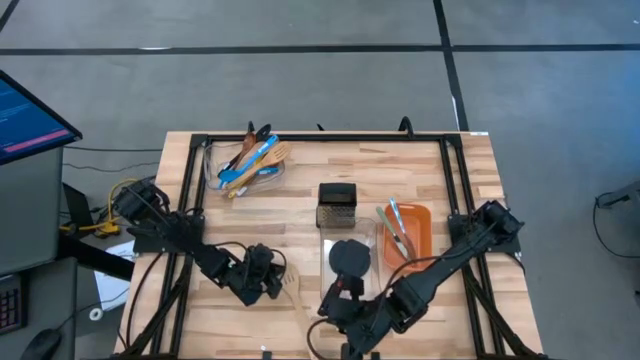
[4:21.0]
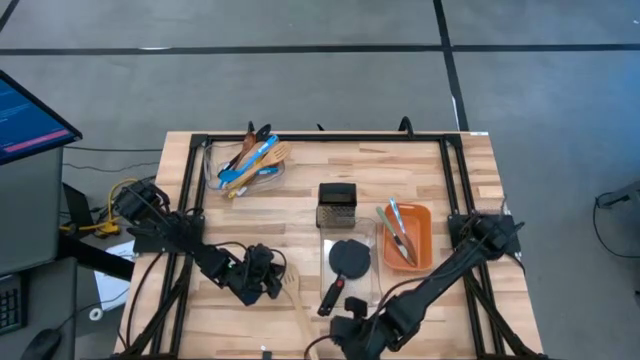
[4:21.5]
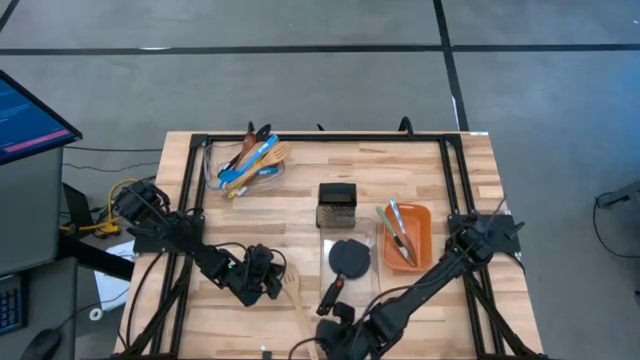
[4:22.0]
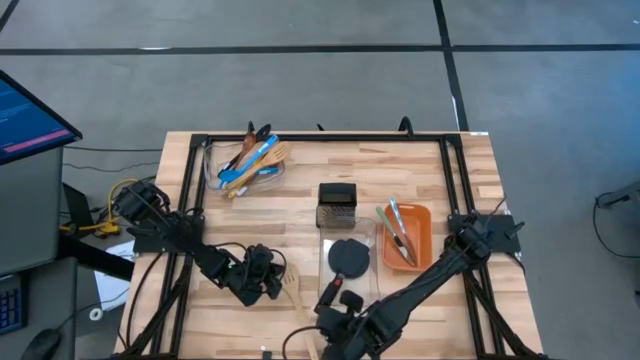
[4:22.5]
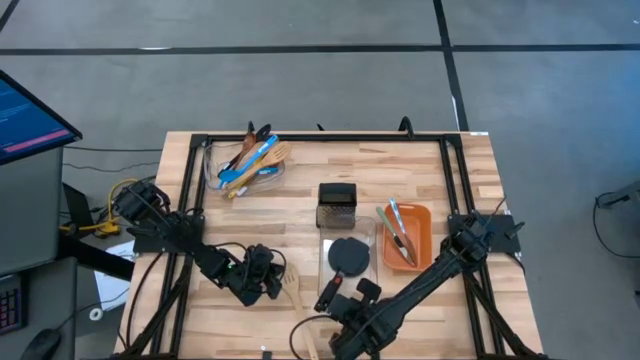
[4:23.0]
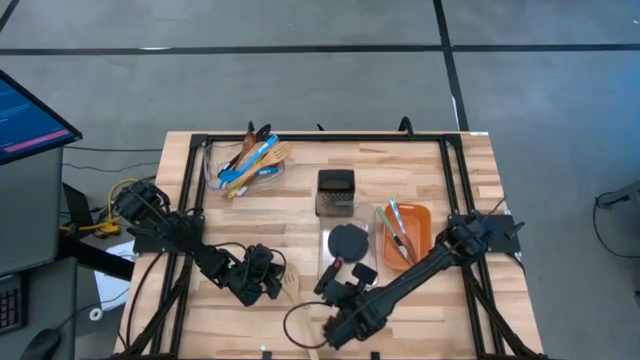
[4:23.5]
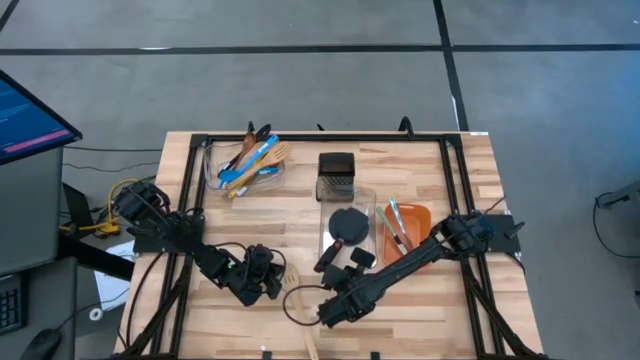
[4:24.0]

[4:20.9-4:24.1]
Task: Pick & Place Kitchen Items
Adjust the bottom transparent bin on the table

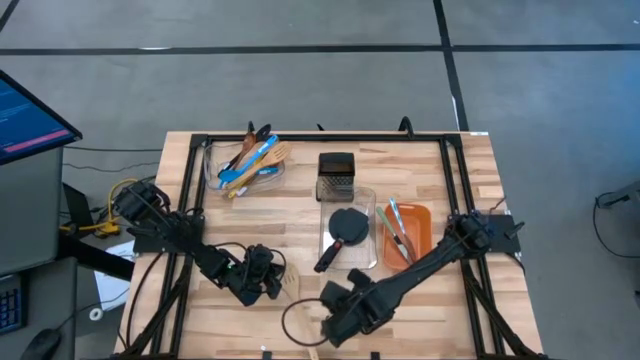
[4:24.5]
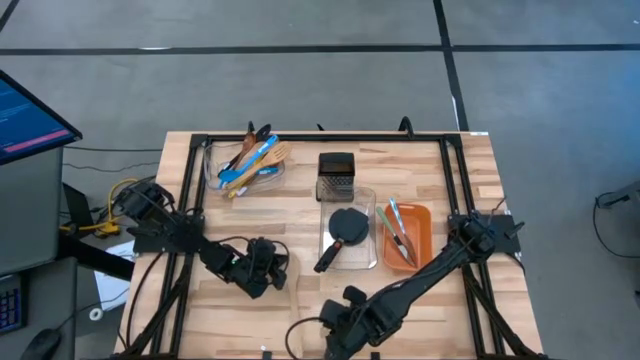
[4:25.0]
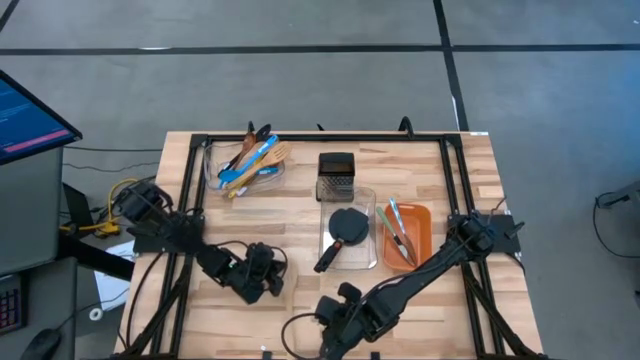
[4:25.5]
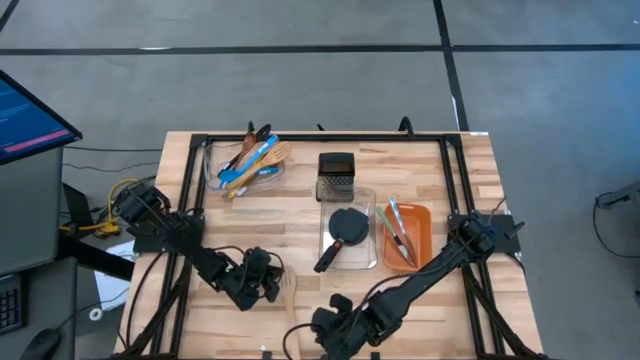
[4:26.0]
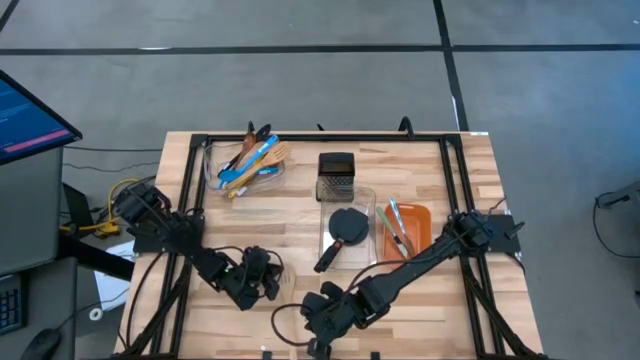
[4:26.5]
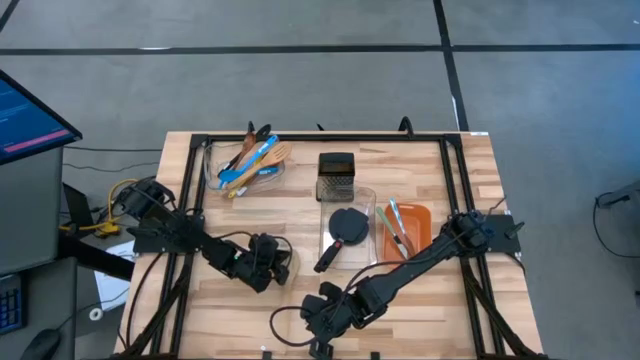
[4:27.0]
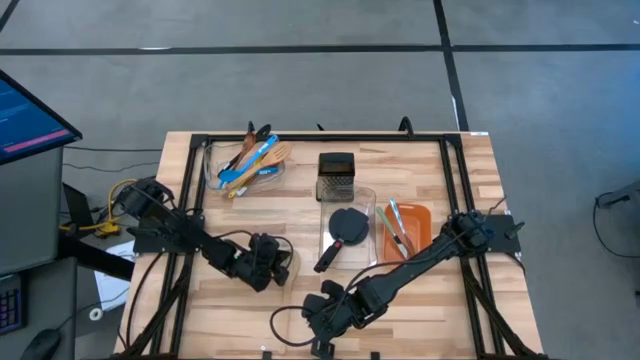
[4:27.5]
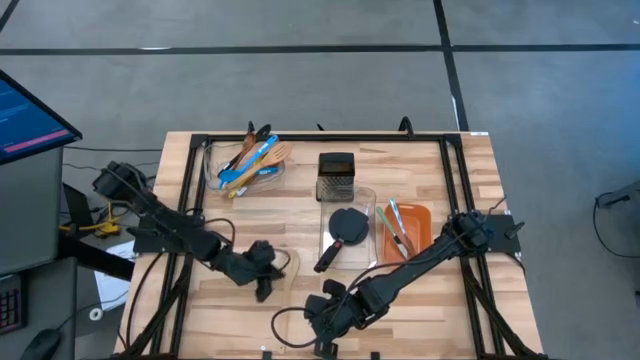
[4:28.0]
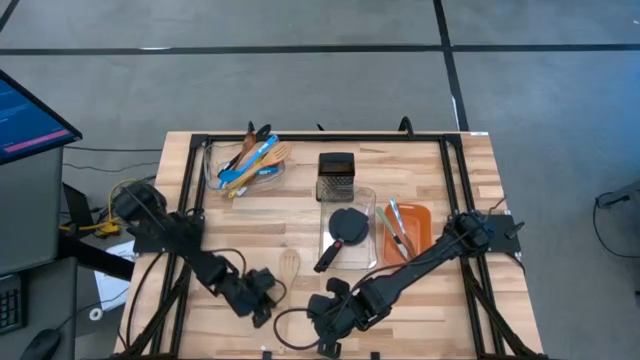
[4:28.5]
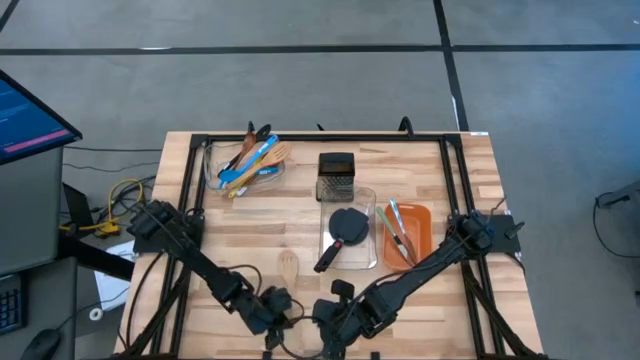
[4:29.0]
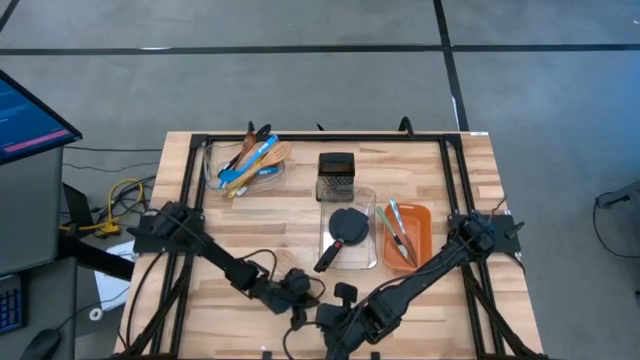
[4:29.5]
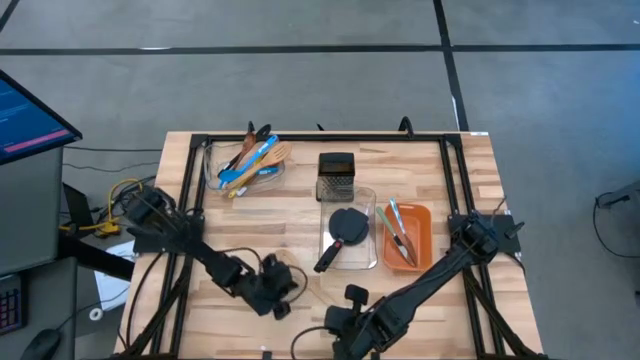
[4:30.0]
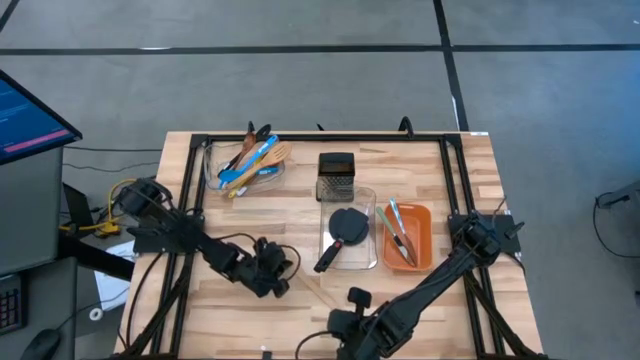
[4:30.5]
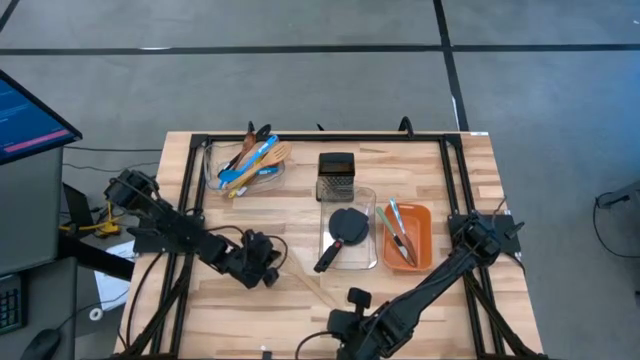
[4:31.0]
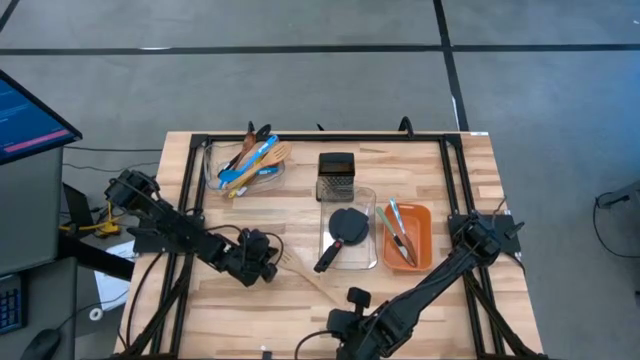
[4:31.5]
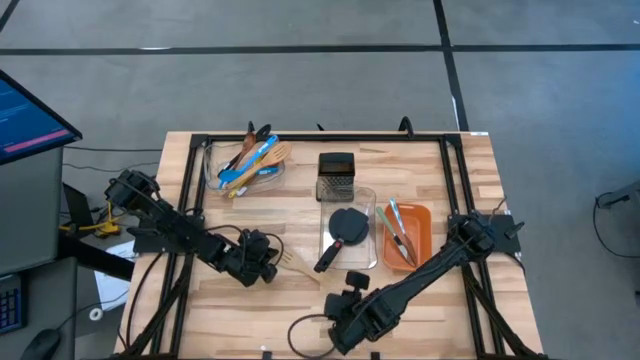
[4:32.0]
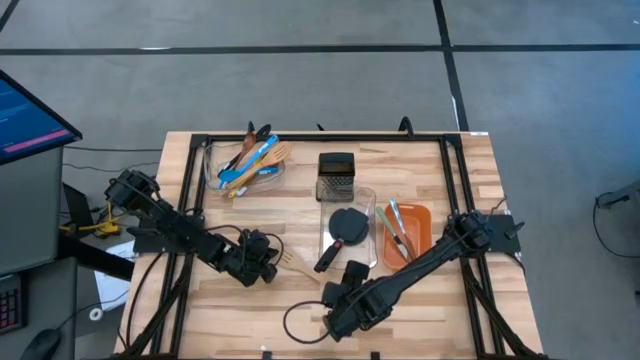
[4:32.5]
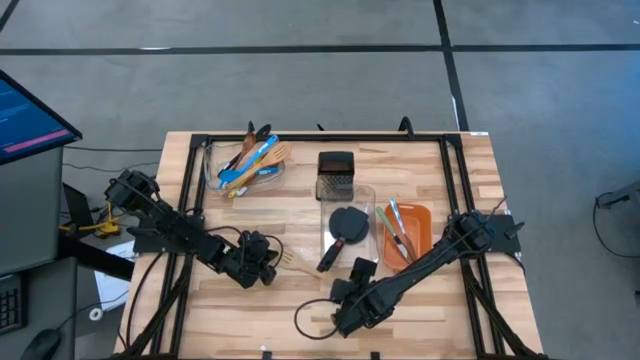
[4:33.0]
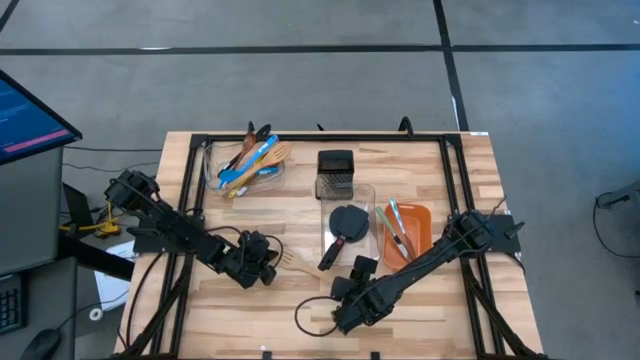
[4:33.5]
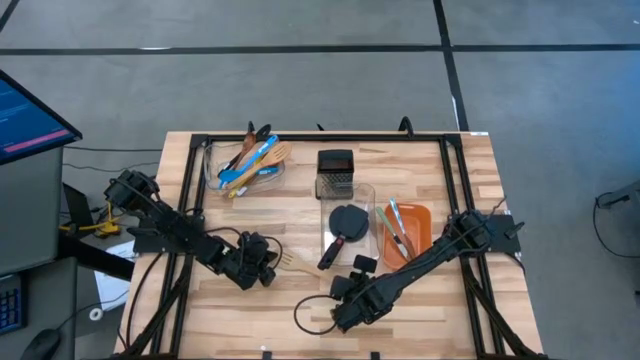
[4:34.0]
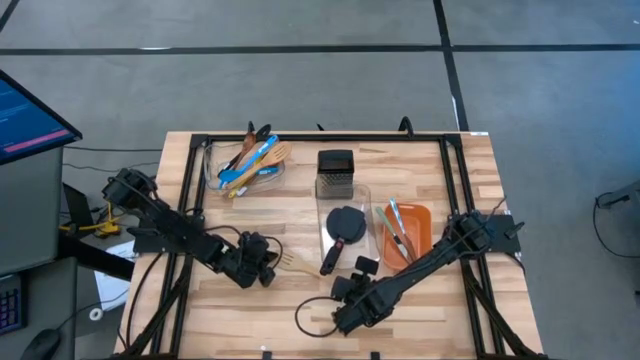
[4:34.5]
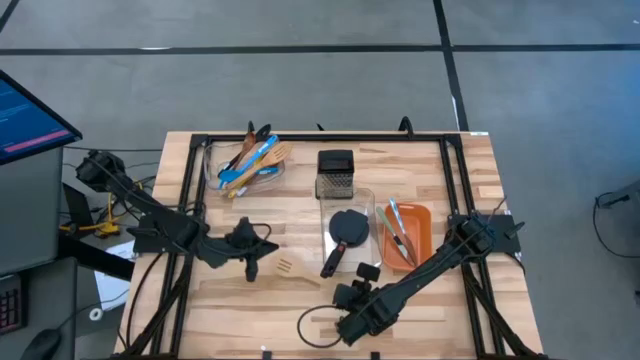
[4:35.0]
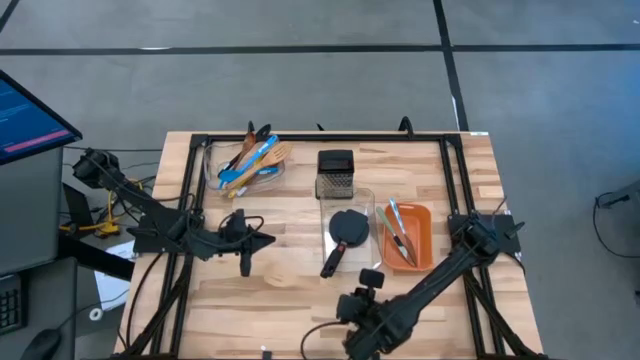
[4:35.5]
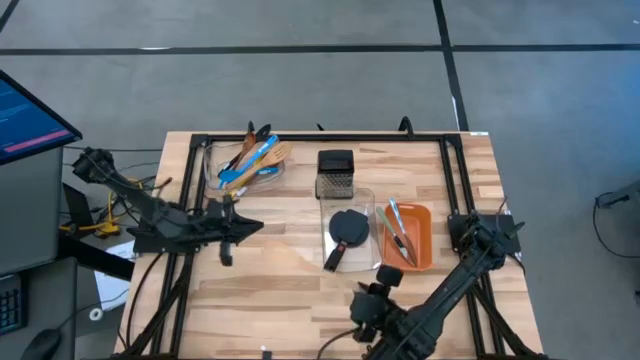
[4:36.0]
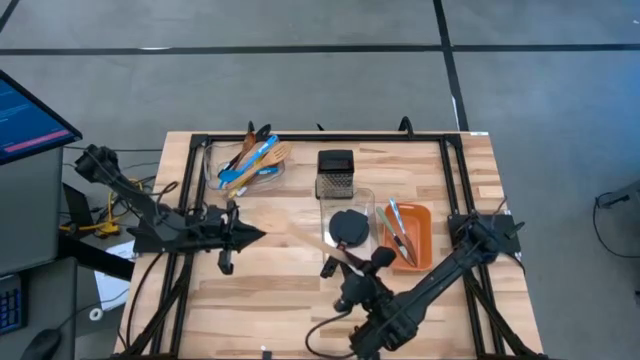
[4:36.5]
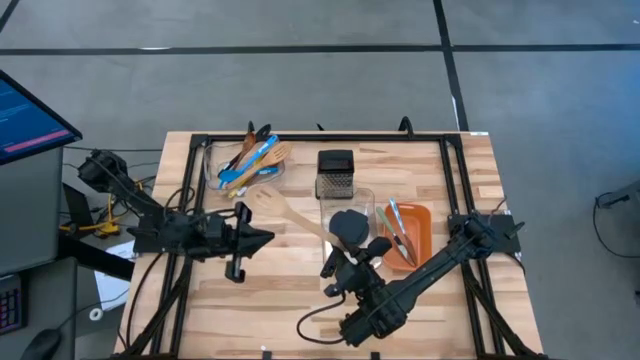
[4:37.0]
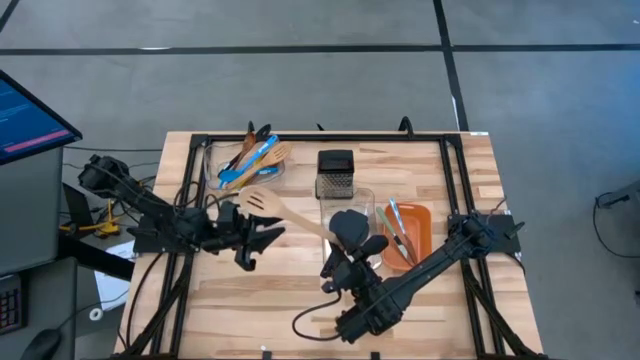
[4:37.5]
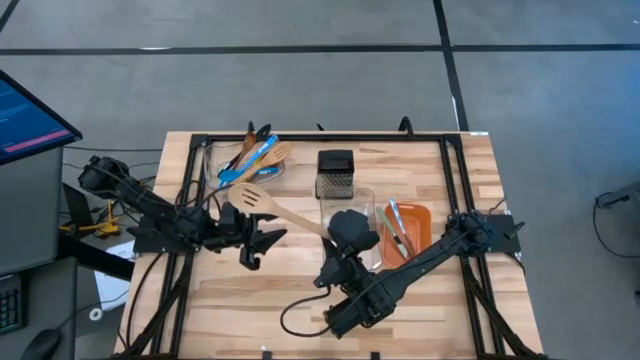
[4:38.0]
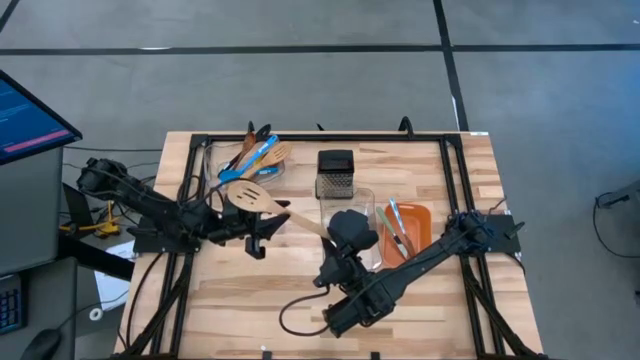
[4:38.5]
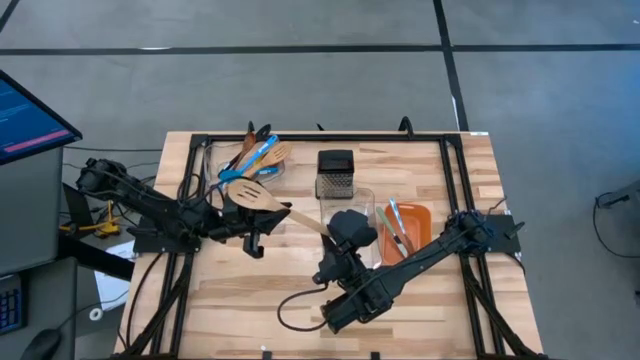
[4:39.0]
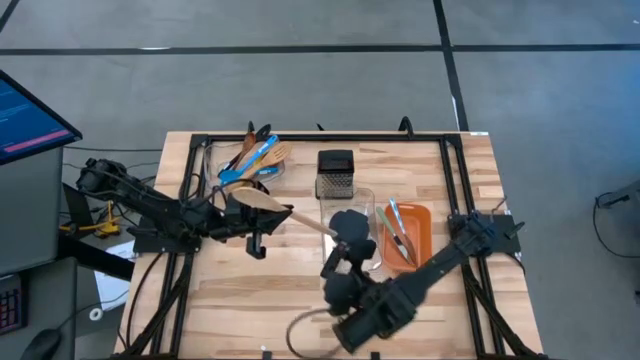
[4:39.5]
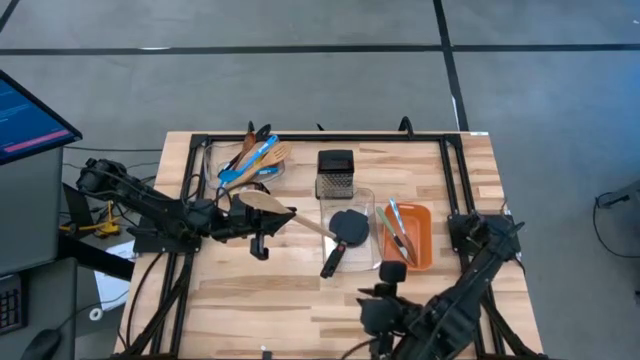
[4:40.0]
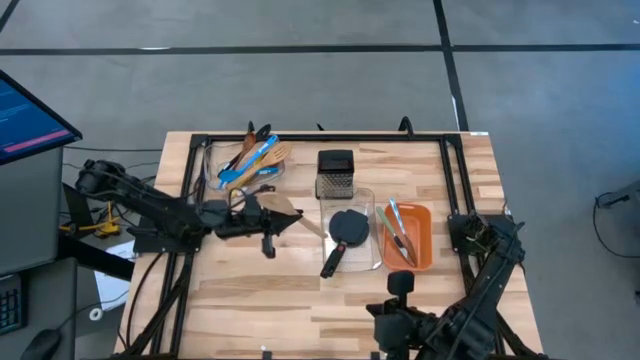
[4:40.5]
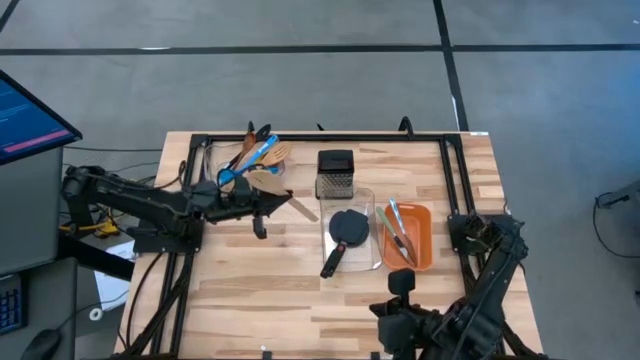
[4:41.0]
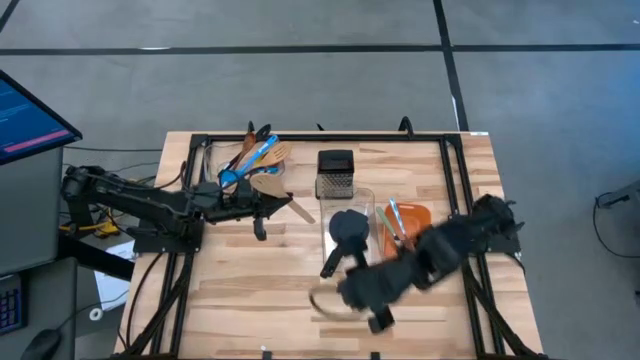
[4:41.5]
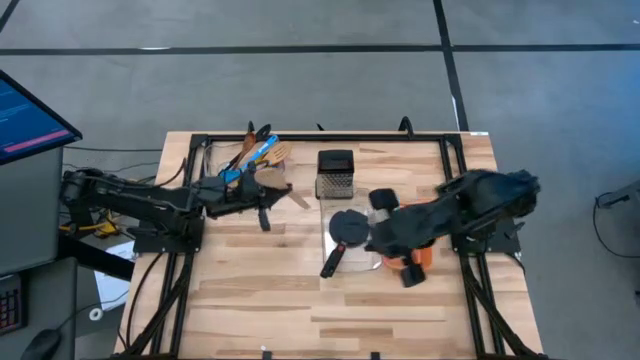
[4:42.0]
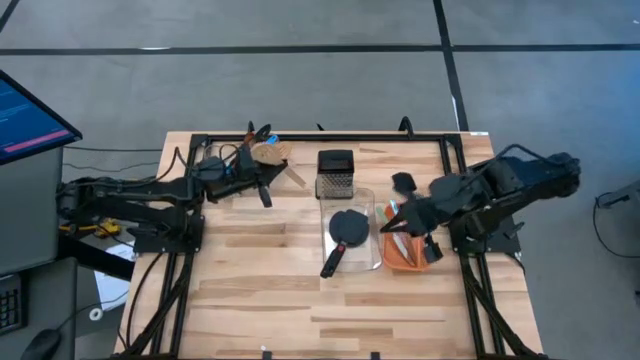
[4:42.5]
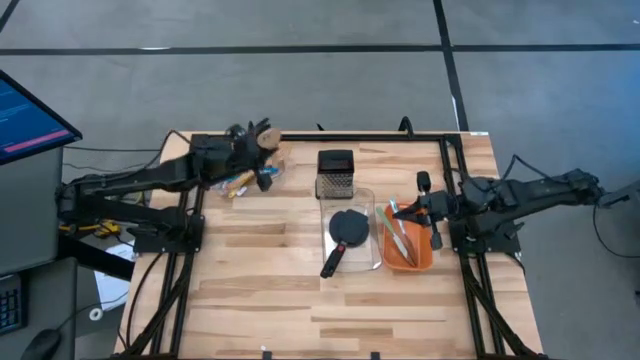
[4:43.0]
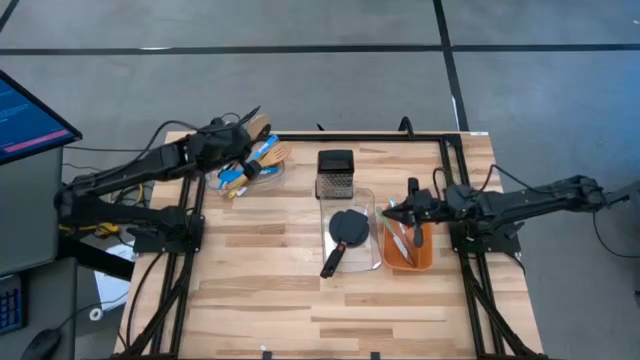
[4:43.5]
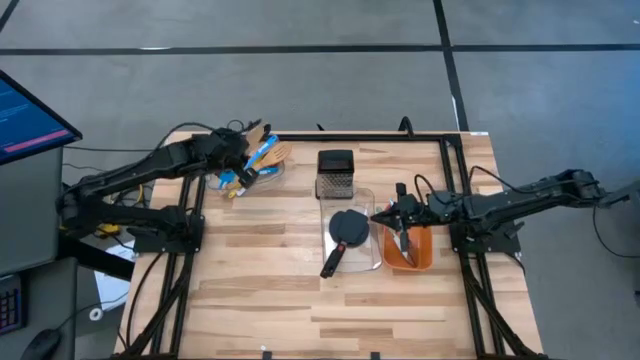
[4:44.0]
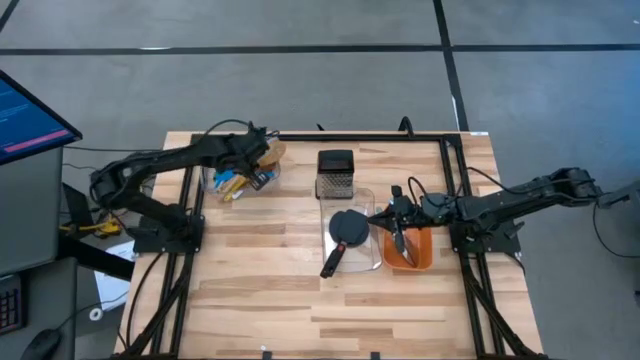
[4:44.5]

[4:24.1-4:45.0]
Put the brown ladle into the top transparent bin
